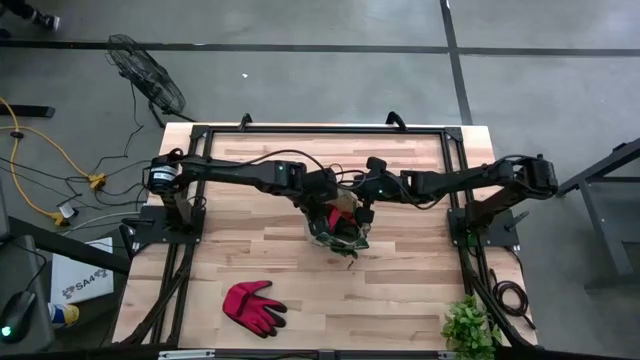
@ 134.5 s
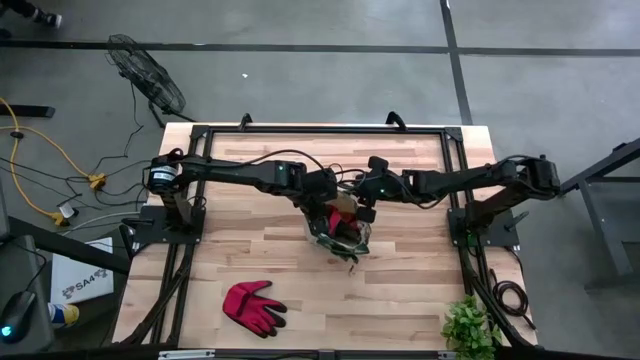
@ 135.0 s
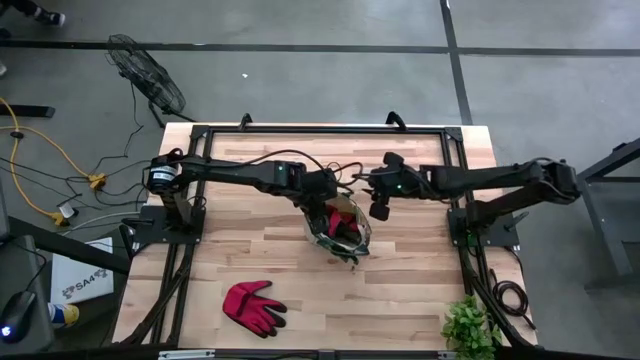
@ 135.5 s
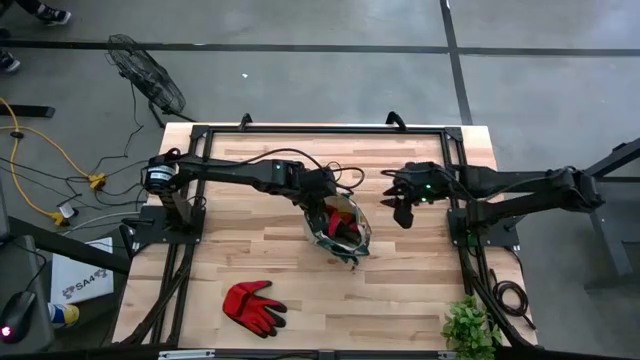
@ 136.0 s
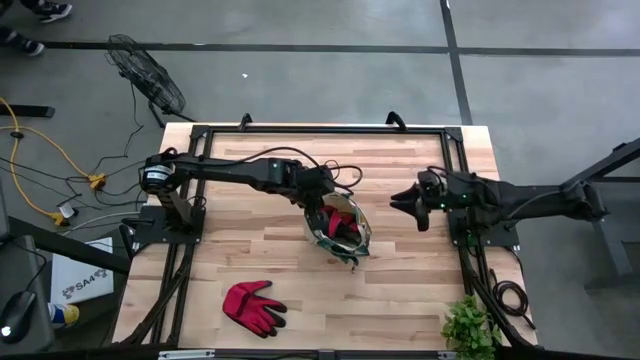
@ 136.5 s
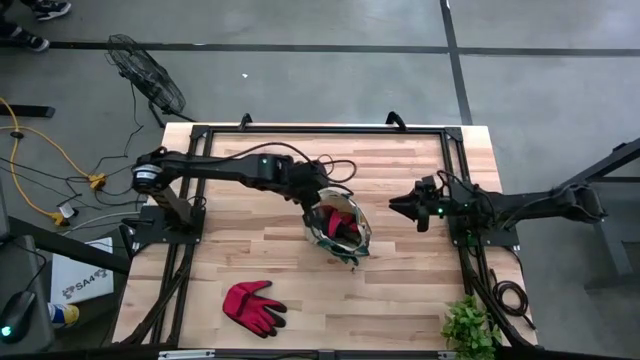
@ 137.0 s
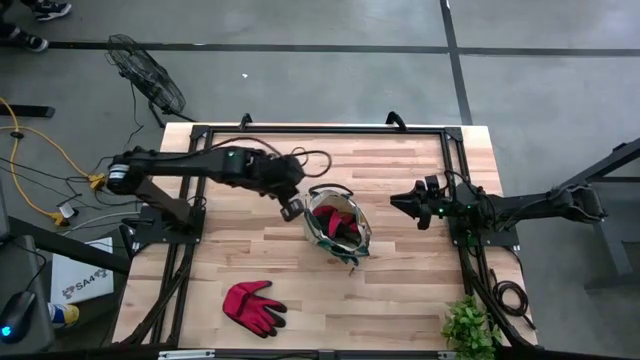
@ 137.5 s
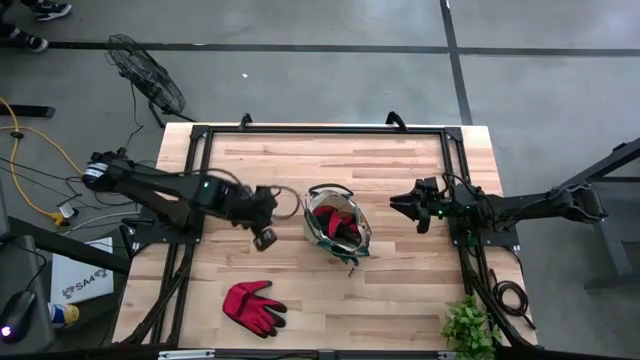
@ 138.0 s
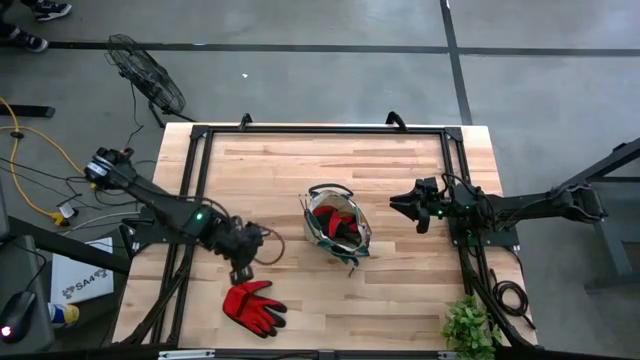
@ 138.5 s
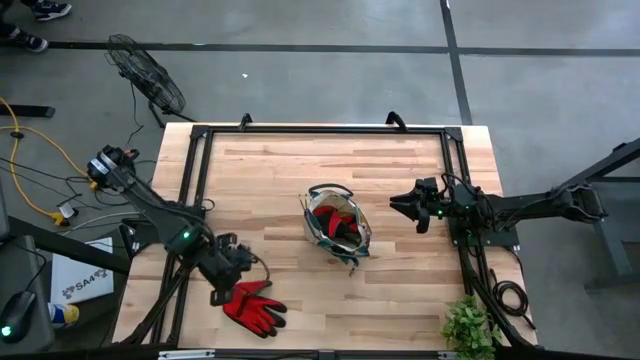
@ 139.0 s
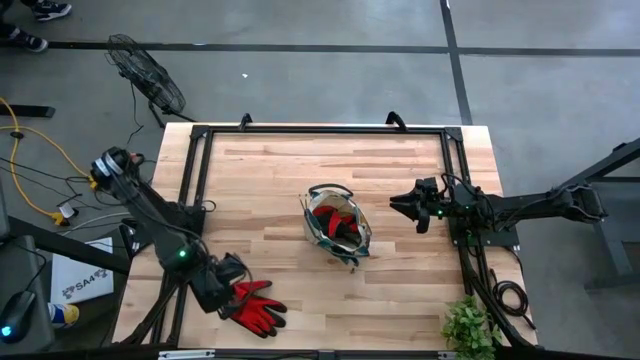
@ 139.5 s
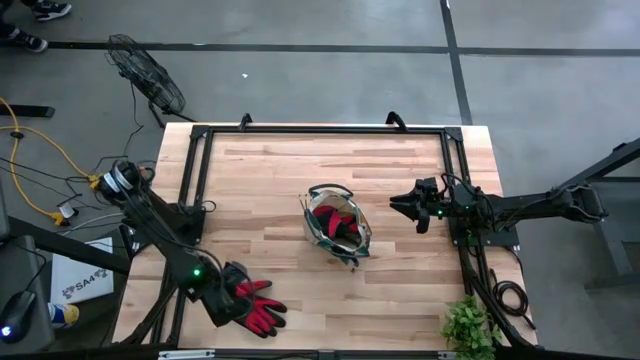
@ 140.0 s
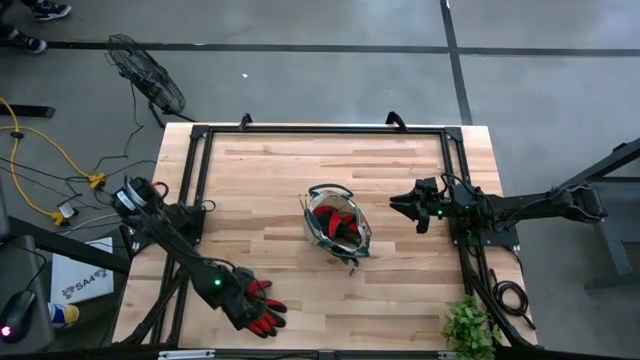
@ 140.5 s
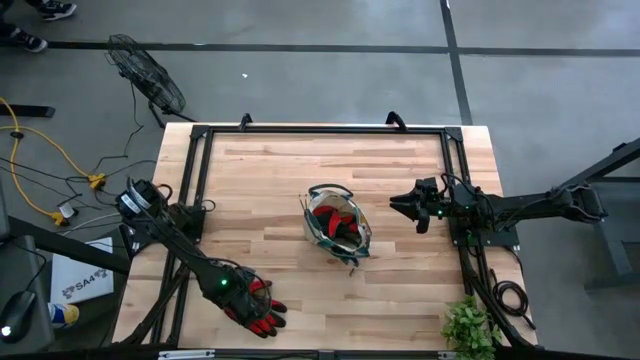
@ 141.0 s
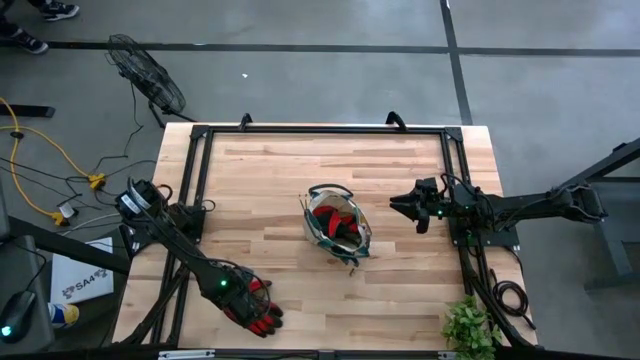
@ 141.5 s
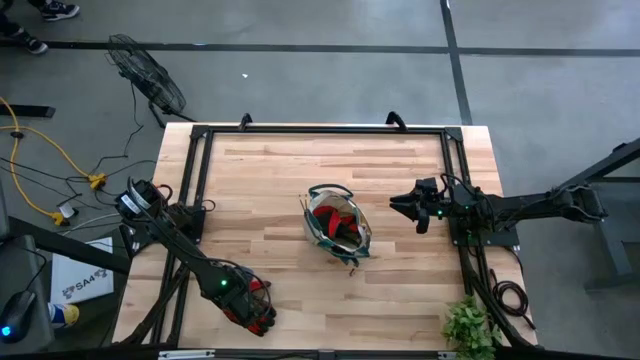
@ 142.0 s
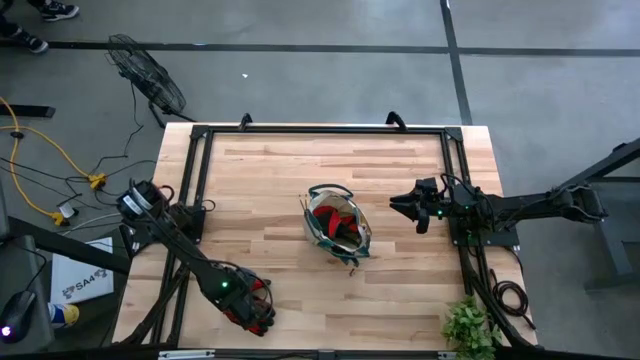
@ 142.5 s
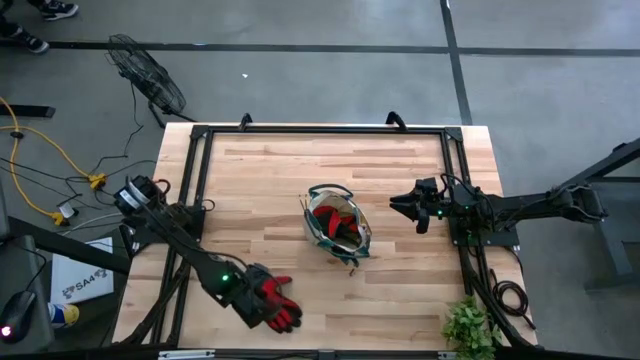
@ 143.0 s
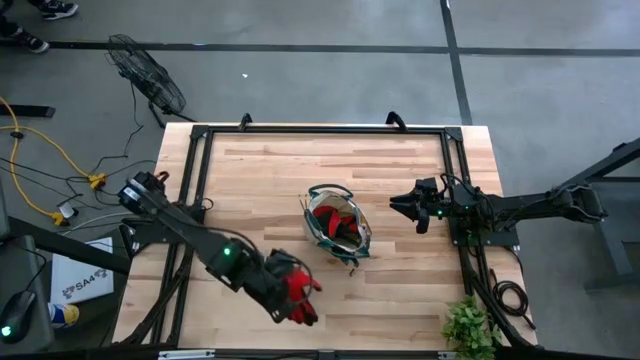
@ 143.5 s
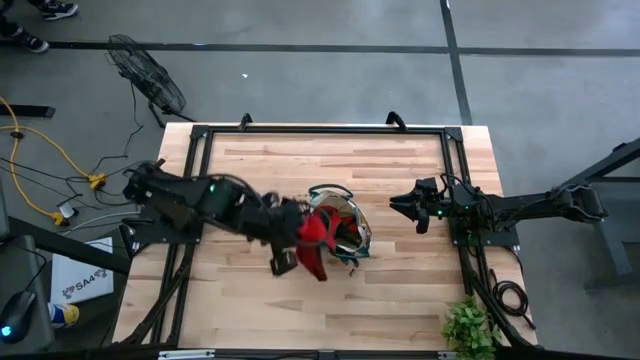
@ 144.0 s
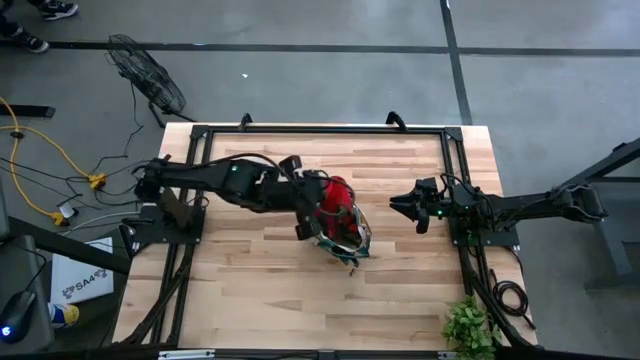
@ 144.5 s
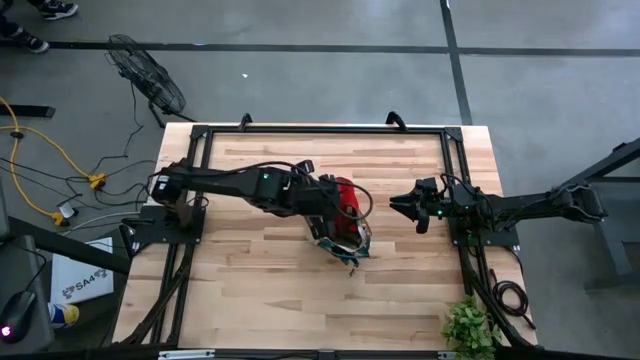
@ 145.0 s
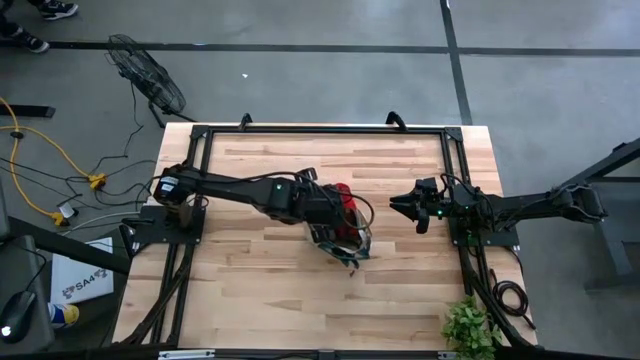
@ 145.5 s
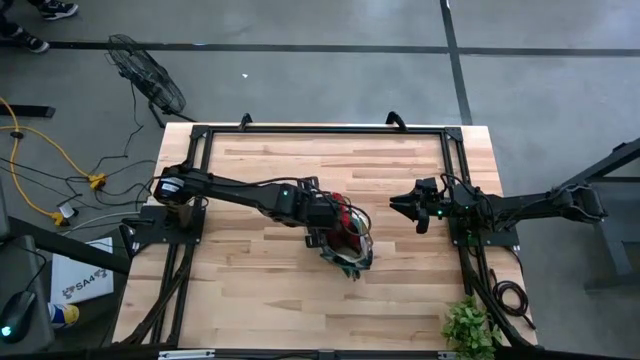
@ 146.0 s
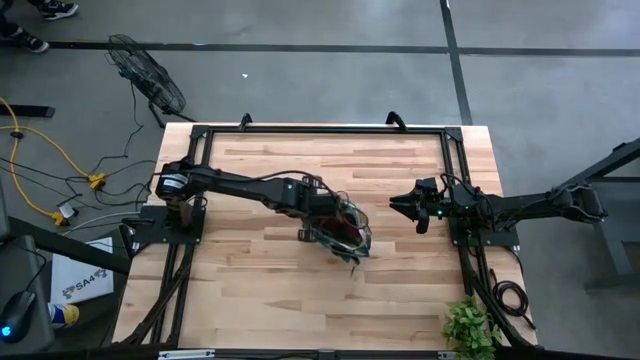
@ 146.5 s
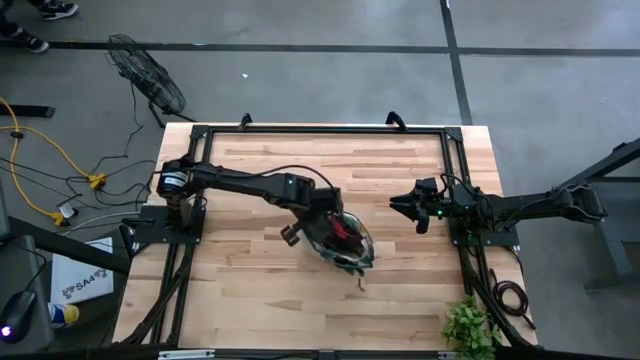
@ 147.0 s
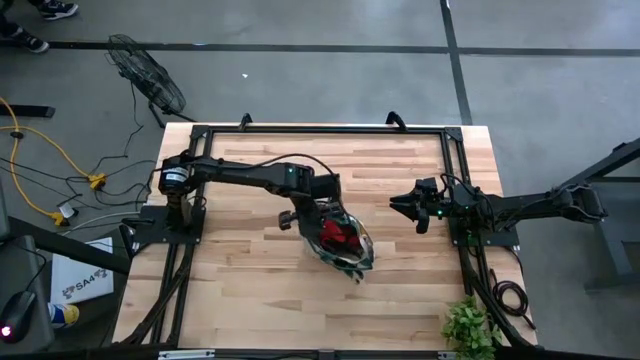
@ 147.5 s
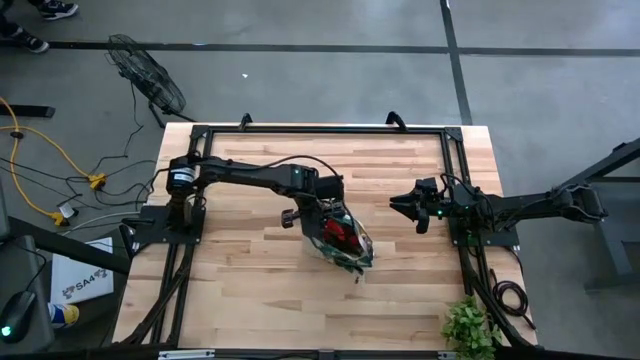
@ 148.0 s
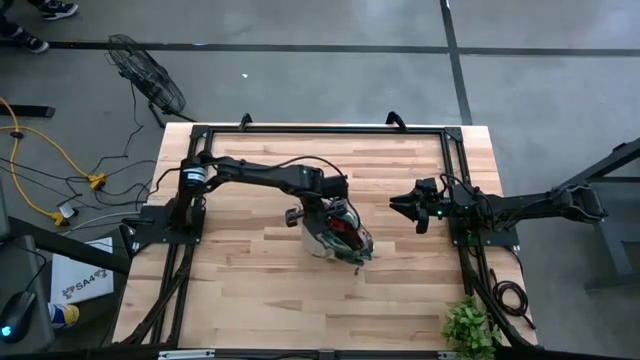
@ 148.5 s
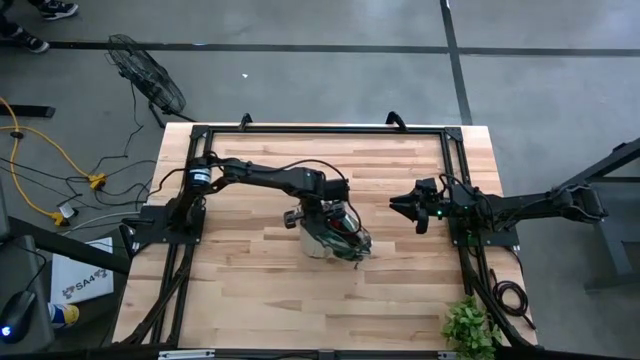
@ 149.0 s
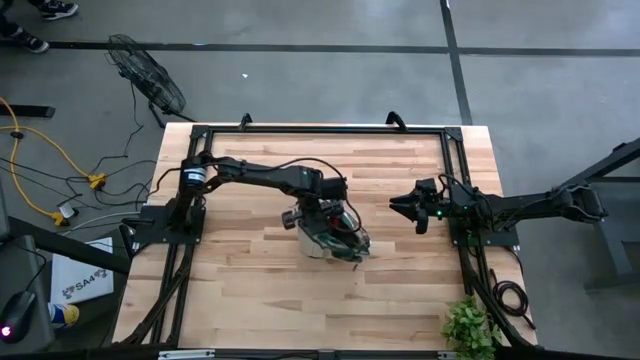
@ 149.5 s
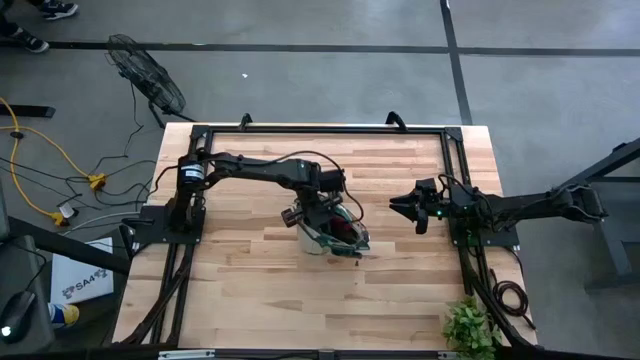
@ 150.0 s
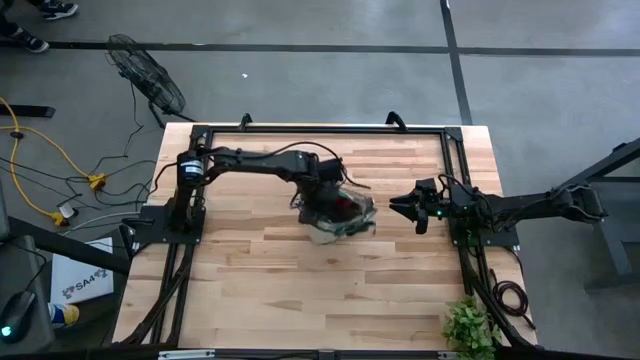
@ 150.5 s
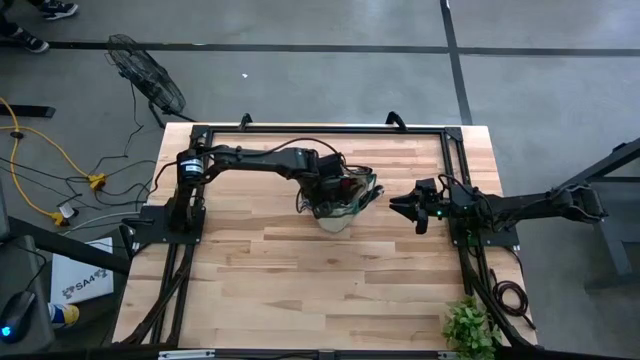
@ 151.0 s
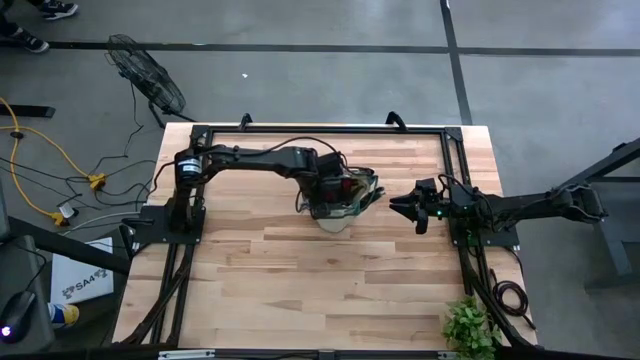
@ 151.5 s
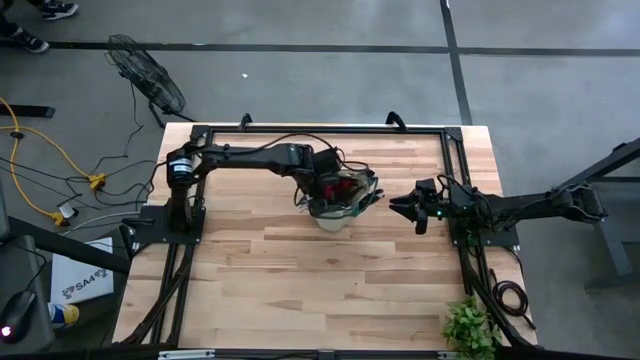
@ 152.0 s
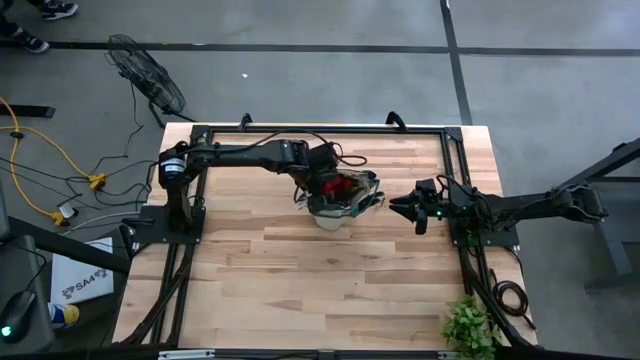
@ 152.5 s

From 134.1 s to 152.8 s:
Task: Pick & Place Garden tools in Gardening bag
Put the red glove into the gardening bag

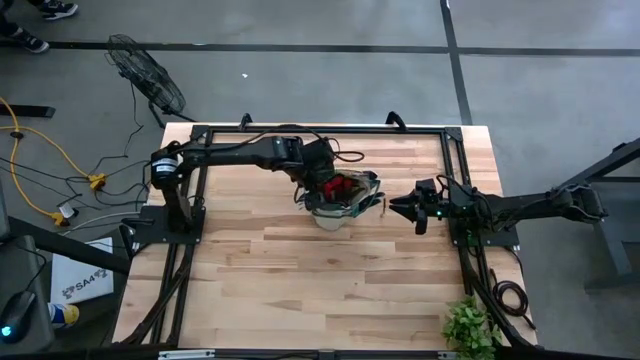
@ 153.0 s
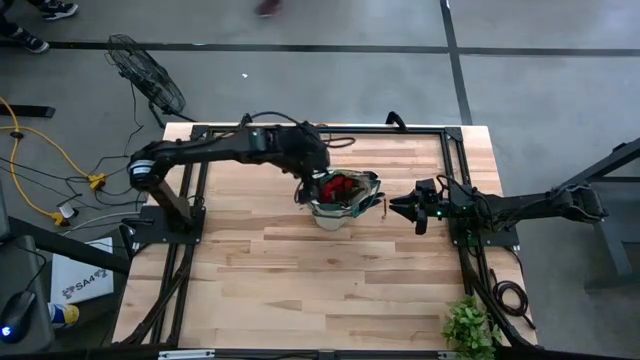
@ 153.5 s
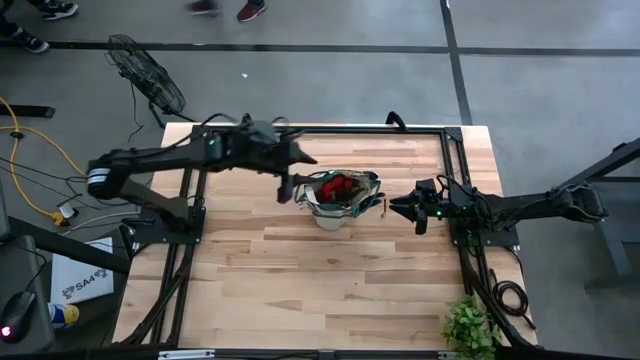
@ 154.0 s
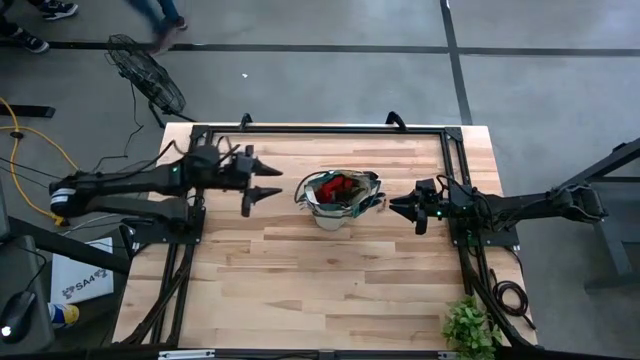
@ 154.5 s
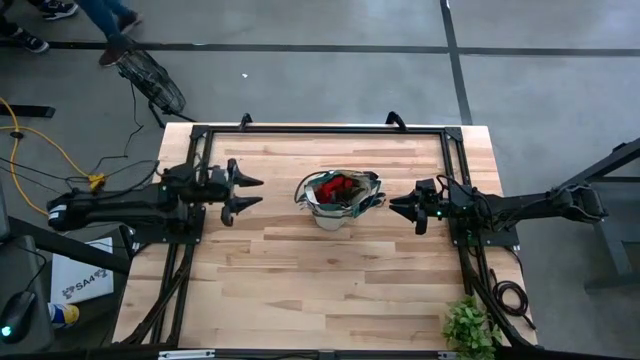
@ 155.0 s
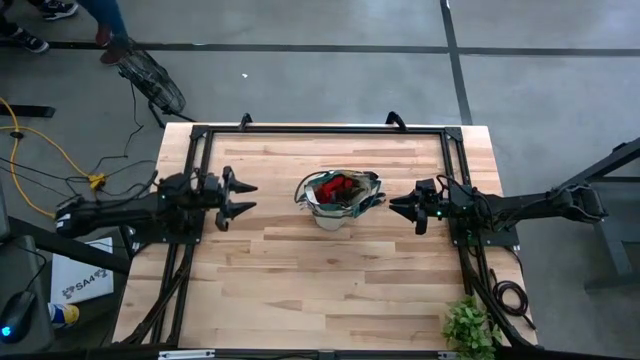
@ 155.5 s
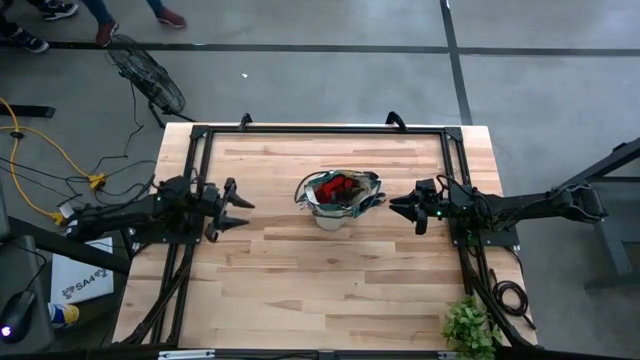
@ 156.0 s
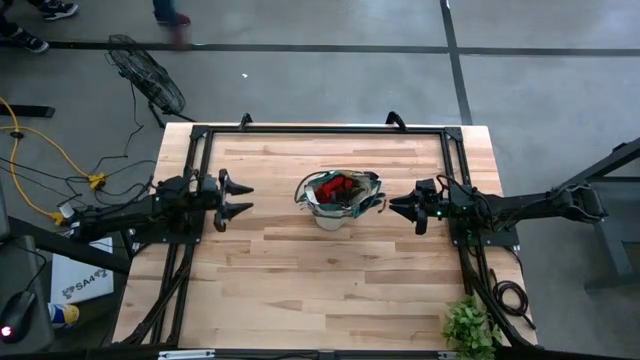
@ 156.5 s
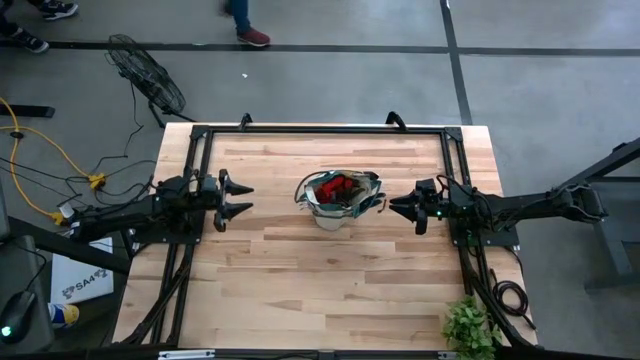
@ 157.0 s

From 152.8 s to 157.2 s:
Return to Home Position
